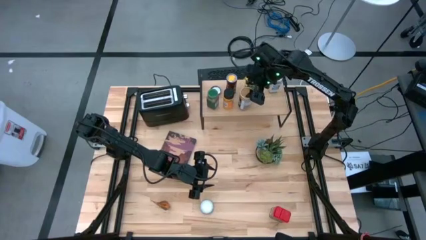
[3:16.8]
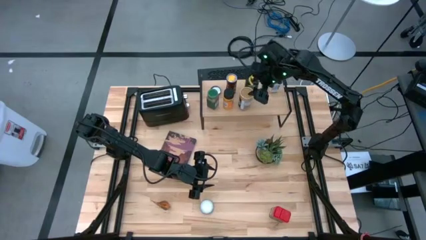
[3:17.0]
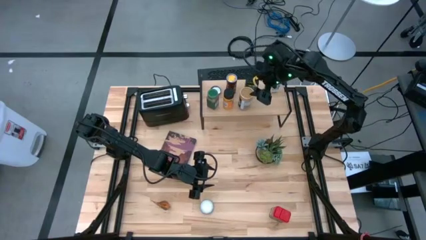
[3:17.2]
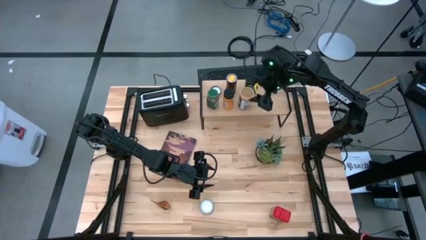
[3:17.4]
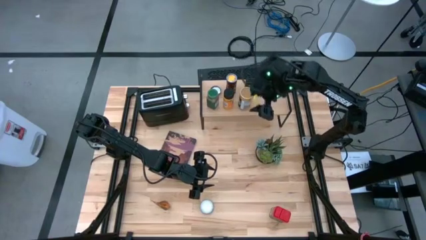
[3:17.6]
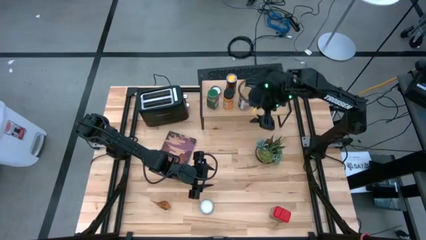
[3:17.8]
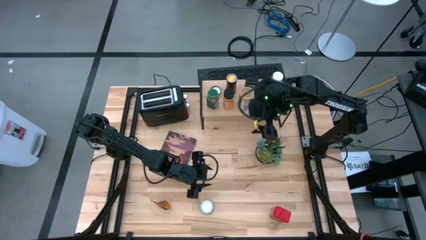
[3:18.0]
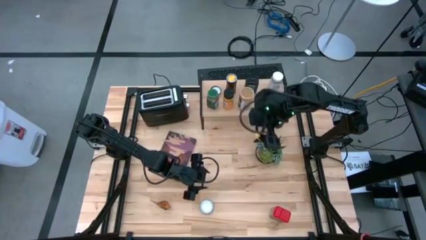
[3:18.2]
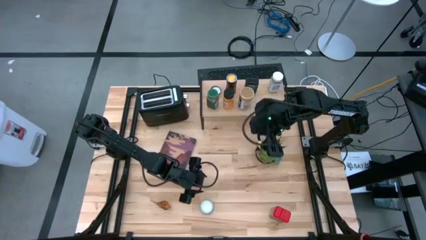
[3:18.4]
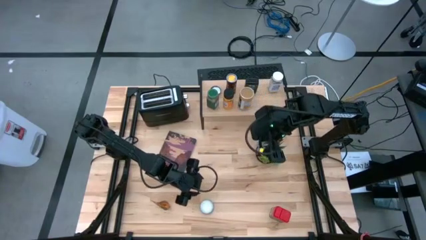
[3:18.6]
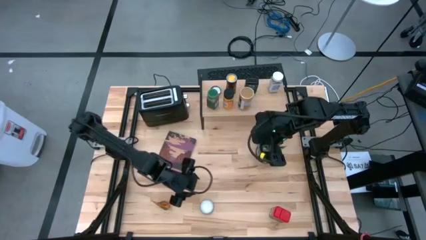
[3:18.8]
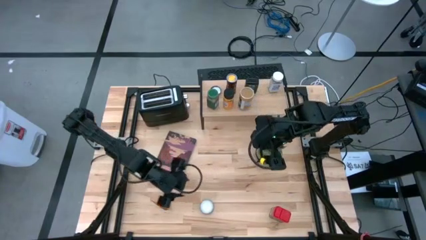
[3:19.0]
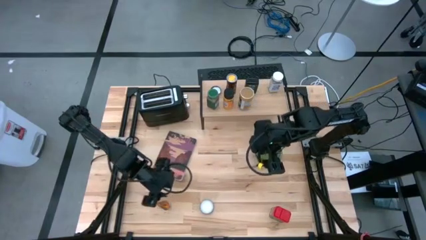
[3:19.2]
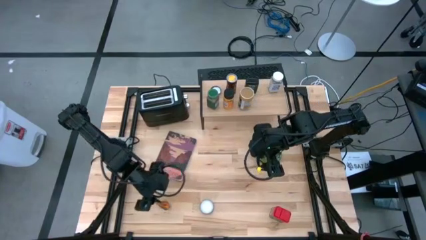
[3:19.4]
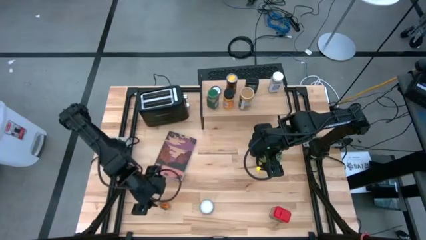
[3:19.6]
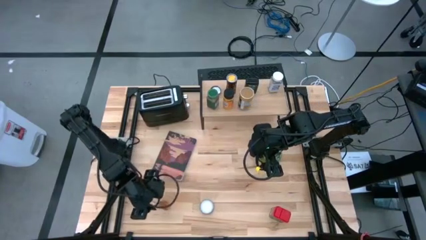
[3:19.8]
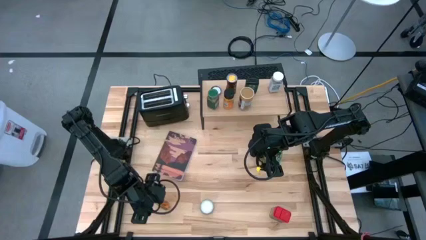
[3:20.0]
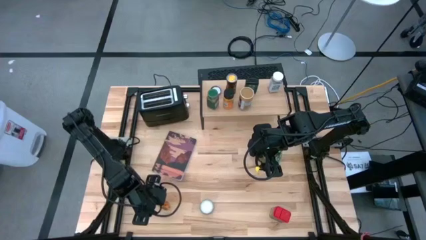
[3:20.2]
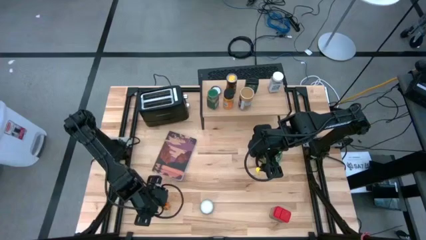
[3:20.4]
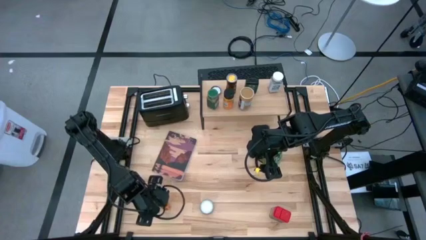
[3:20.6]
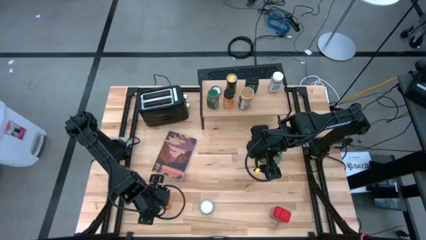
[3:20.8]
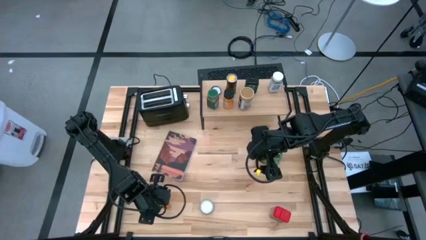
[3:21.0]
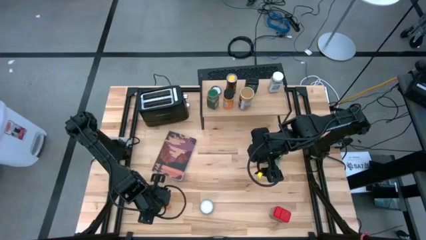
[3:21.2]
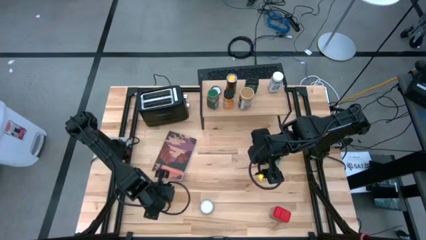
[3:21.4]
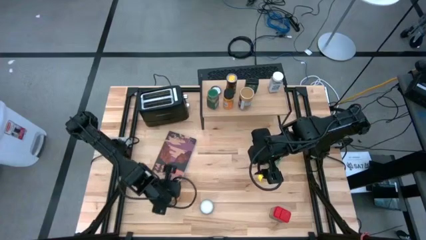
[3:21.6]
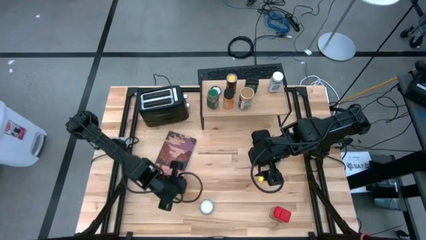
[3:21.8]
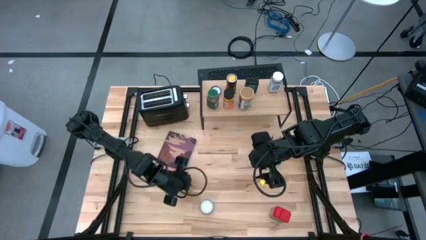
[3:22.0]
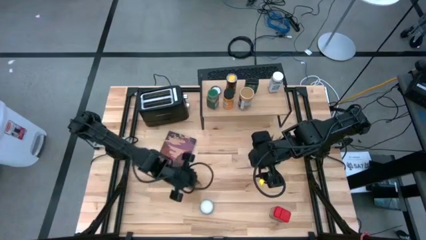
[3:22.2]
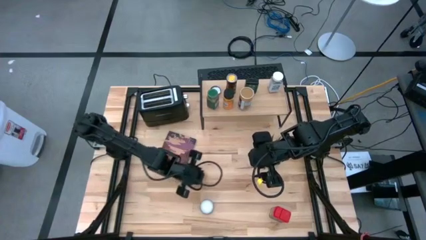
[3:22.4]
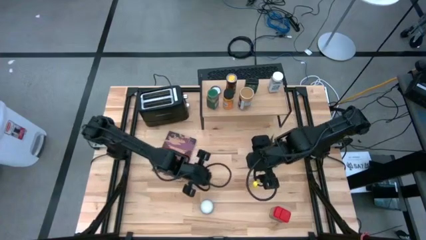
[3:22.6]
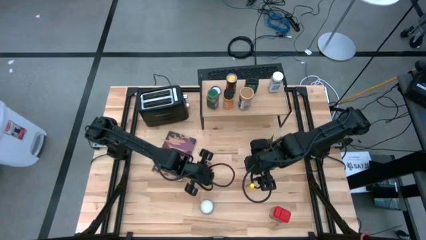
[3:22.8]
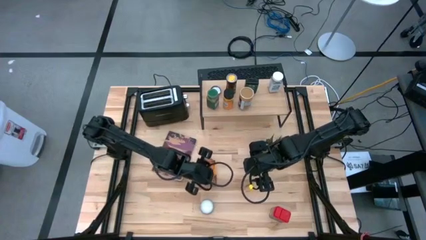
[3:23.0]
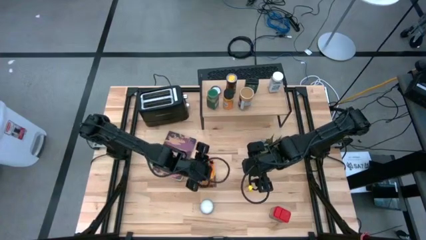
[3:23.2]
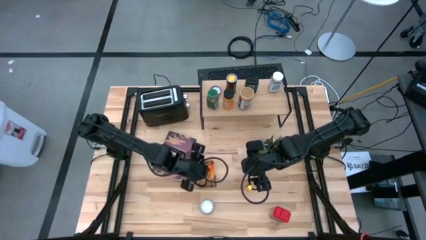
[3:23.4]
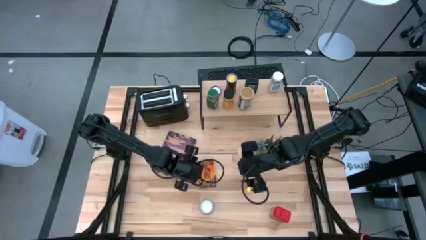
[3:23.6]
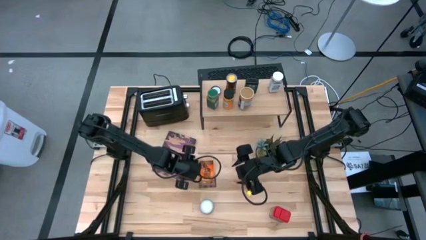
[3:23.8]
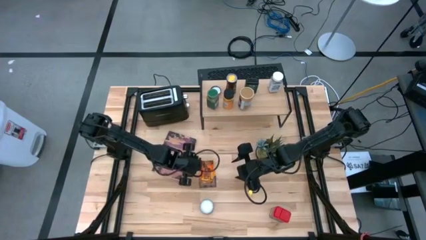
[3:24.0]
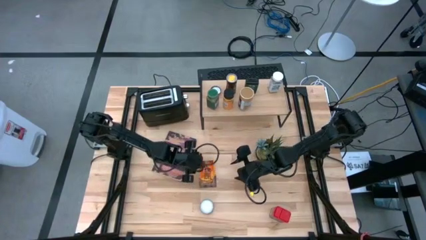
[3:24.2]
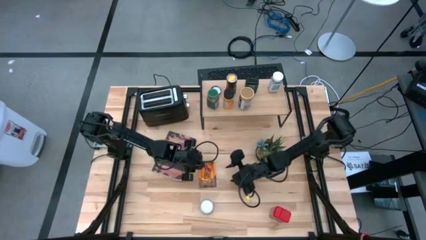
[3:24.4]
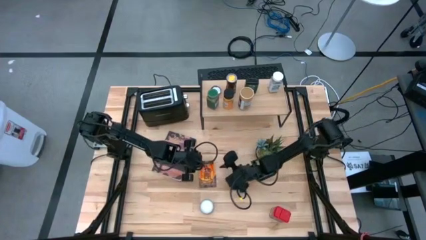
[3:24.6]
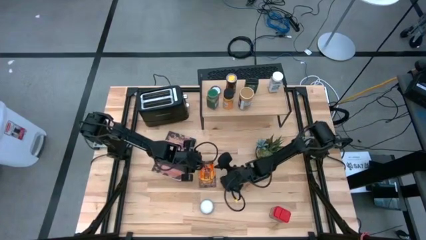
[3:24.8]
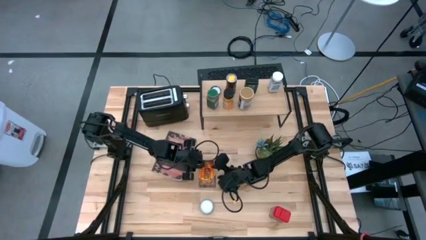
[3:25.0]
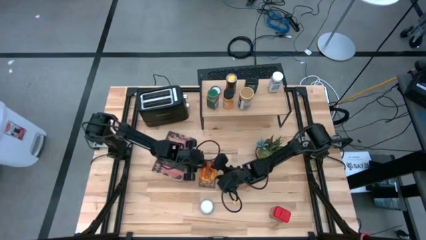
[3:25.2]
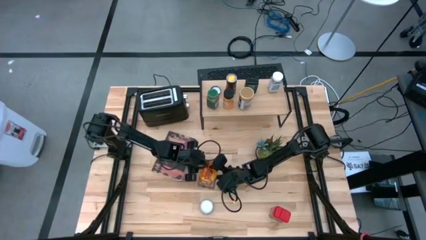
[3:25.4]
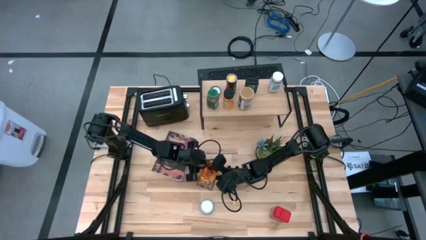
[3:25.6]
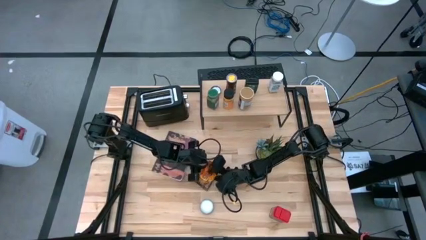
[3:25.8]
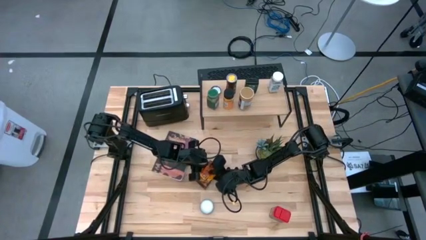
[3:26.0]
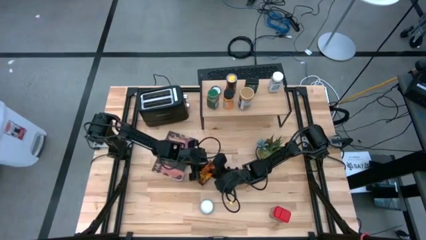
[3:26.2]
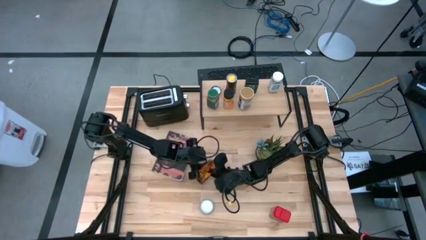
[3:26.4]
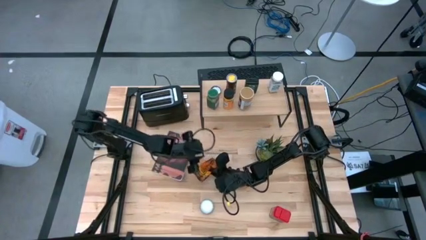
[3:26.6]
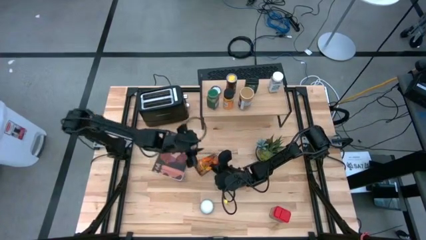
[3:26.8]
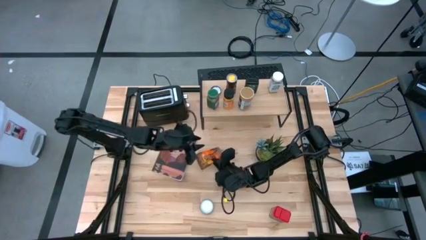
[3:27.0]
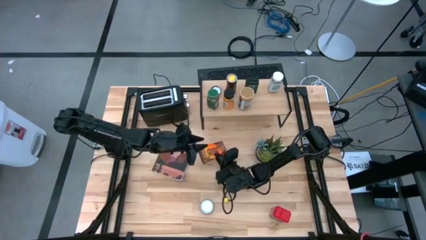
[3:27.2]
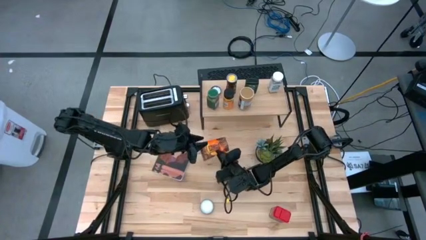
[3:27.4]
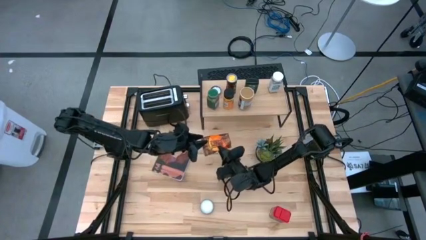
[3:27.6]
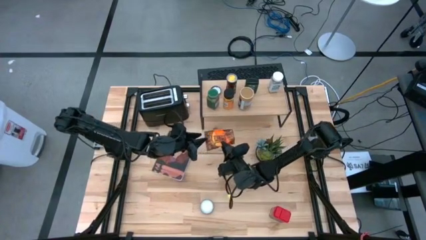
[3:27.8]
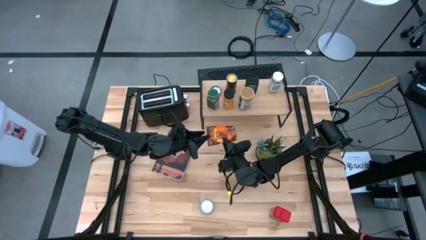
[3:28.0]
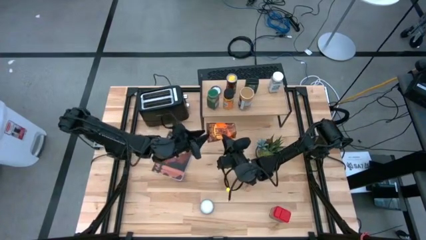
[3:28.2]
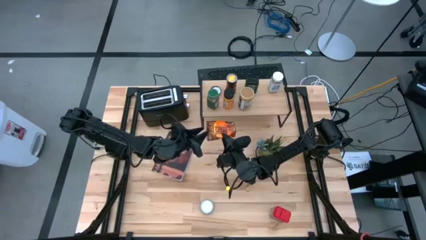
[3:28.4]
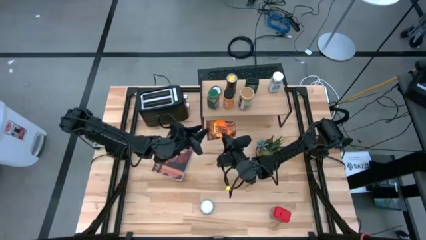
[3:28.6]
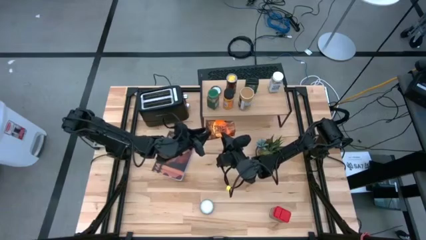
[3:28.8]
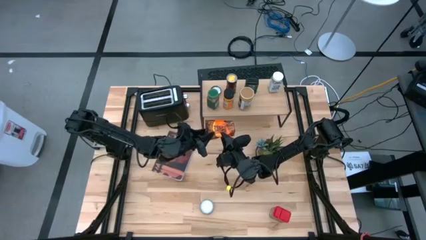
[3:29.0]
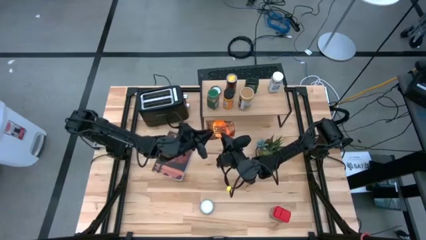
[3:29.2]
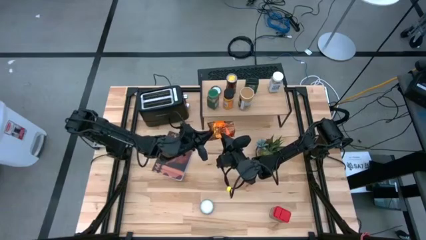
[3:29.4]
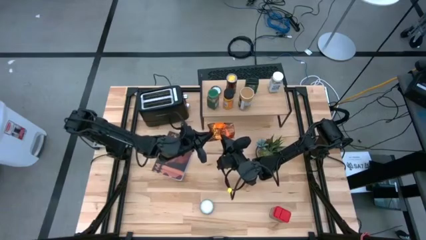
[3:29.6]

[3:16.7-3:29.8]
Task: Shelf spices
Put the orange seasoning pack on the shelf

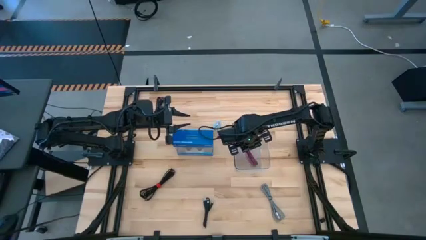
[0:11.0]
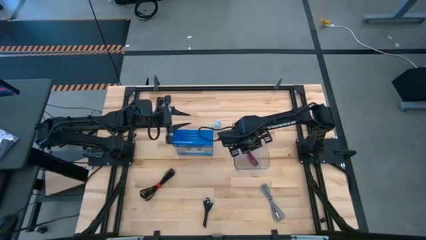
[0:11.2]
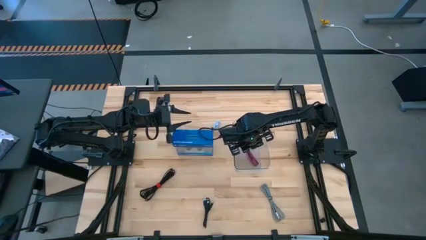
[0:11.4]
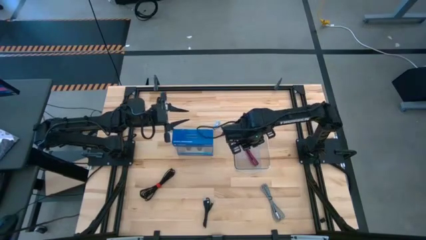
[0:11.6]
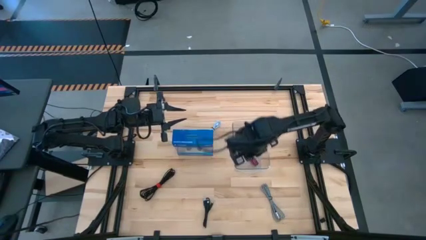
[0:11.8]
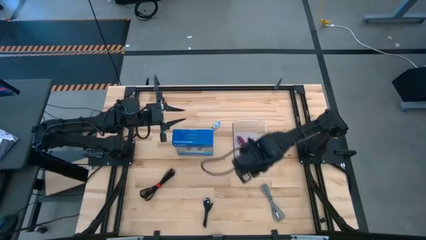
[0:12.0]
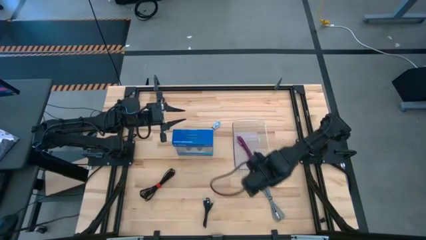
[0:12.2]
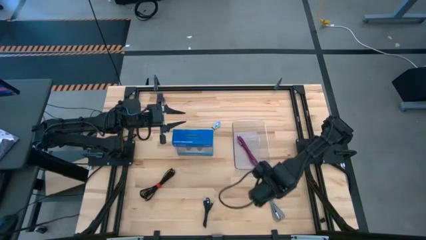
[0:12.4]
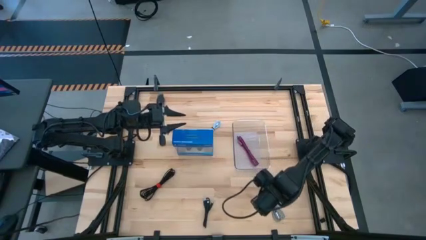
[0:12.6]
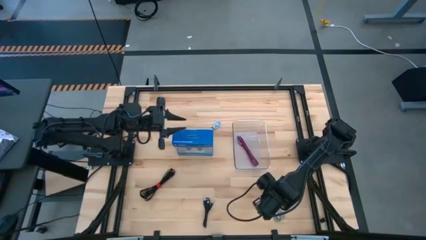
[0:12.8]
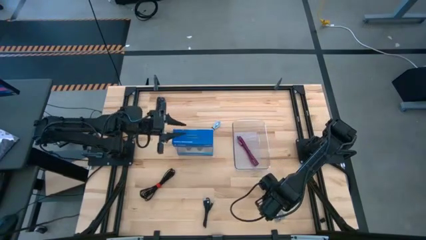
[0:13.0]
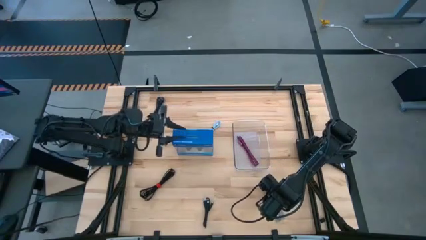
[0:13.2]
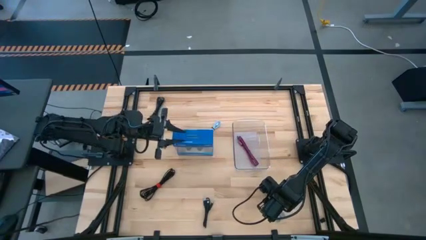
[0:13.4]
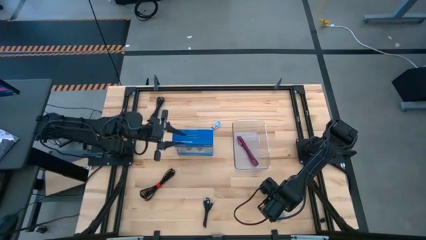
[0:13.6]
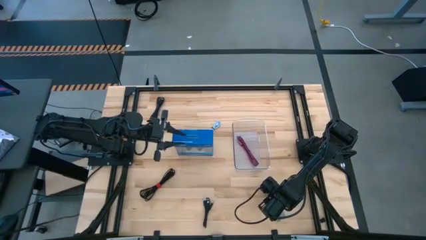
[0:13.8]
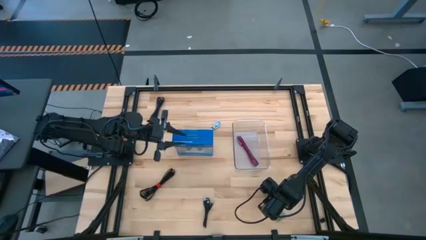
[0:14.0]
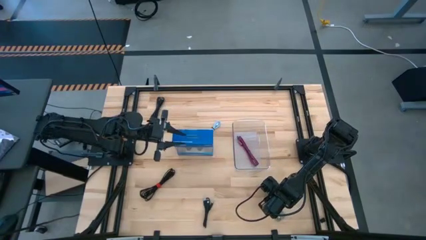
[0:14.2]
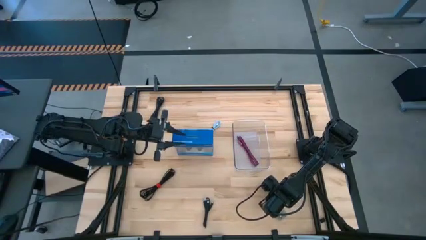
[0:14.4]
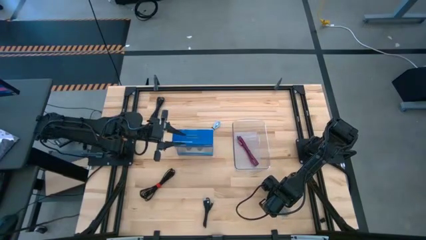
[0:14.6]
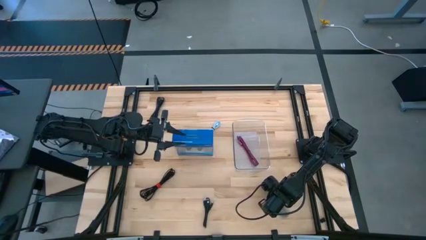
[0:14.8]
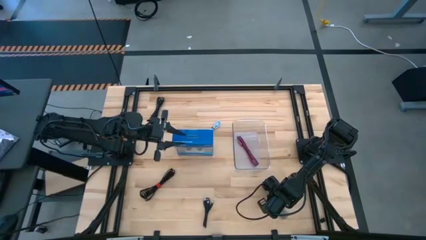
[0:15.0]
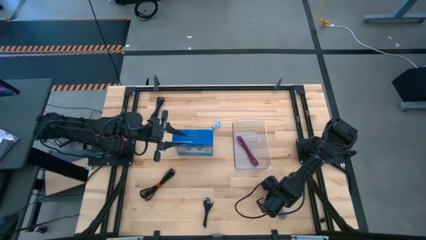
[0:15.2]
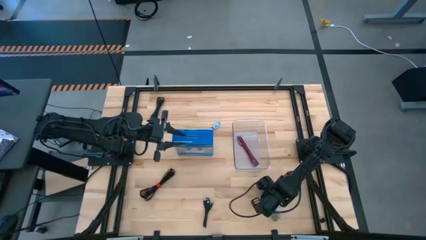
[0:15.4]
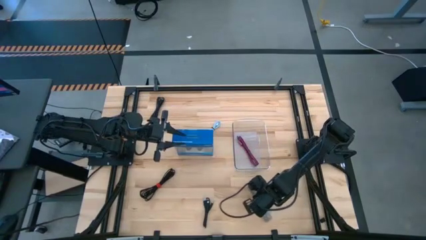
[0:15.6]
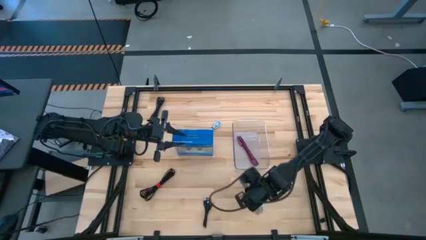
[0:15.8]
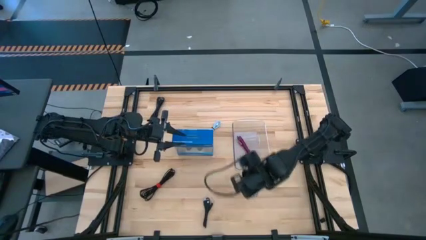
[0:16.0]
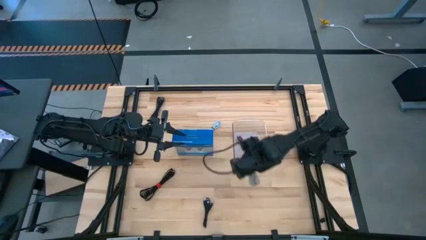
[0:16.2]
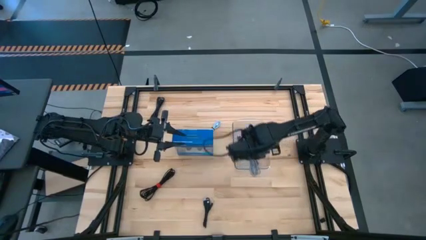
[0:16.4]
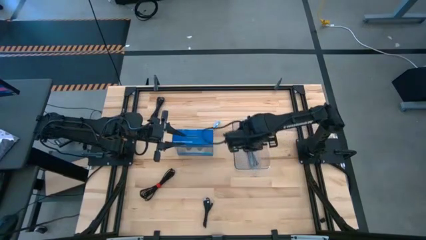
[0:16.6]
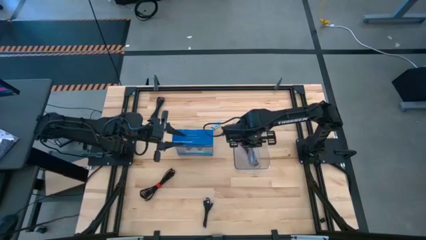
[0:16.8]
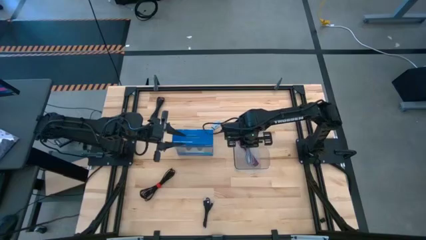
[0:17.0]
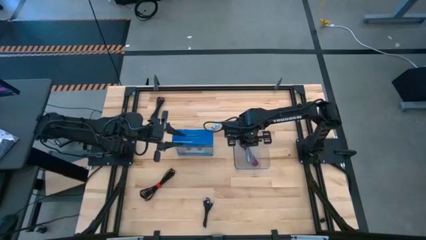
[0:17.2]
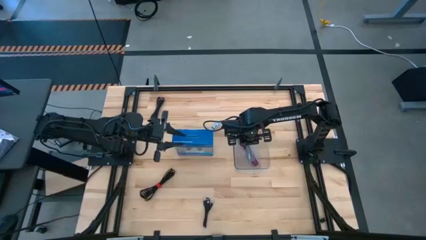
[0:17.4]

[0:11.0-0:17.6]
Task: Pick and place USB-C Cables
Put the white black charger cable into the transparent bin
